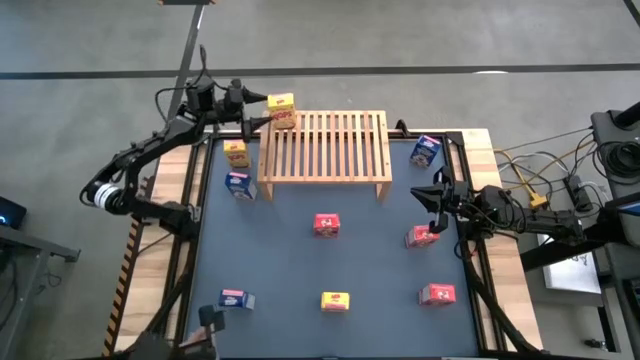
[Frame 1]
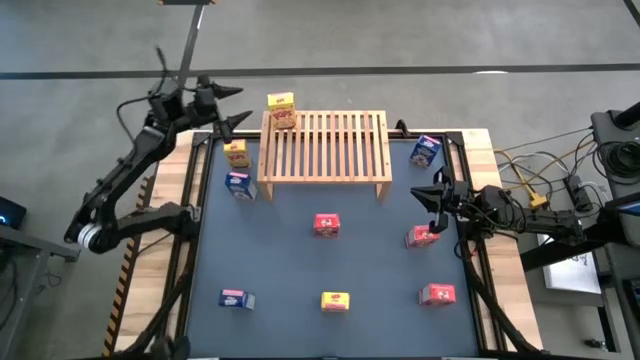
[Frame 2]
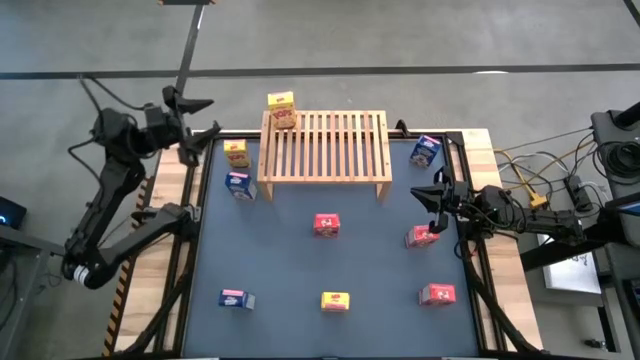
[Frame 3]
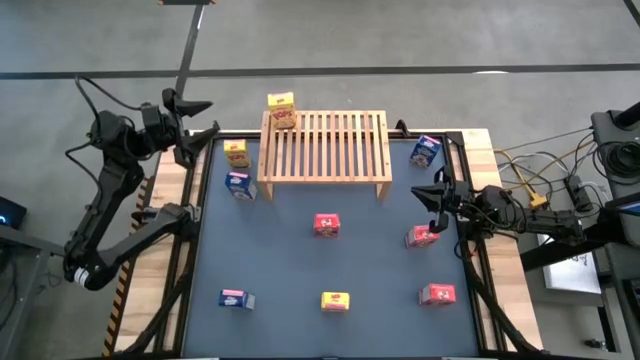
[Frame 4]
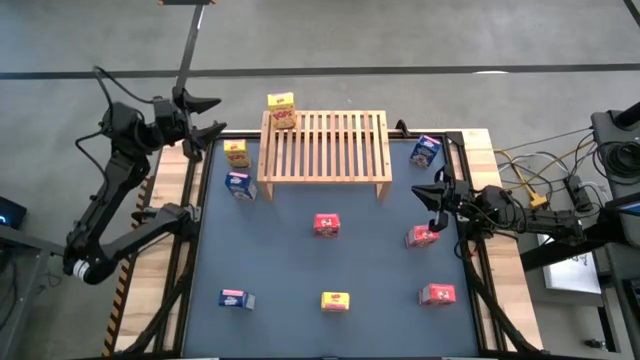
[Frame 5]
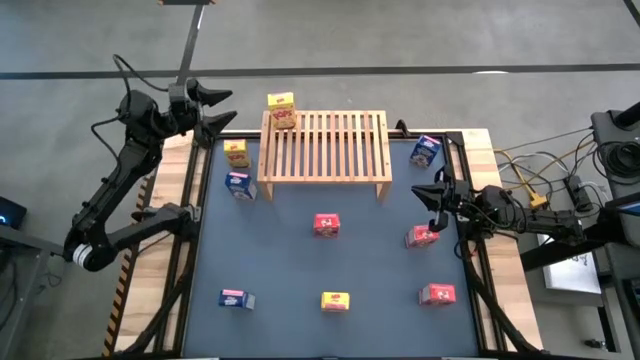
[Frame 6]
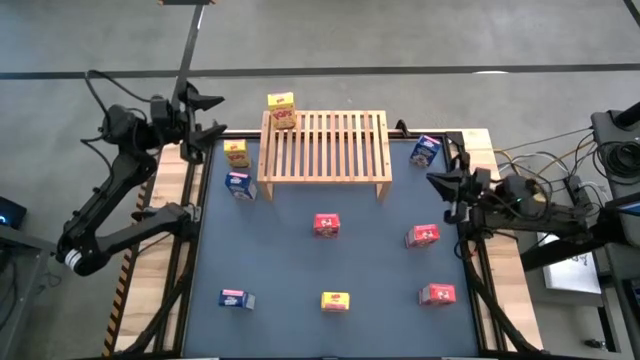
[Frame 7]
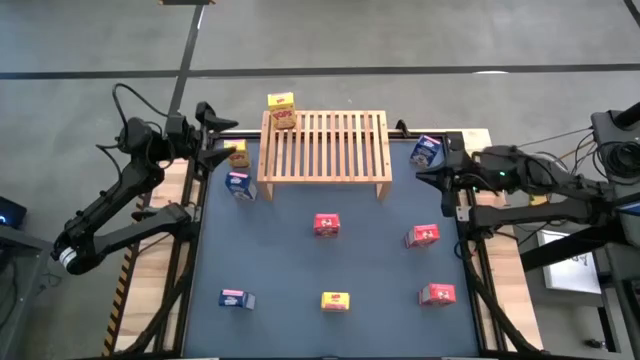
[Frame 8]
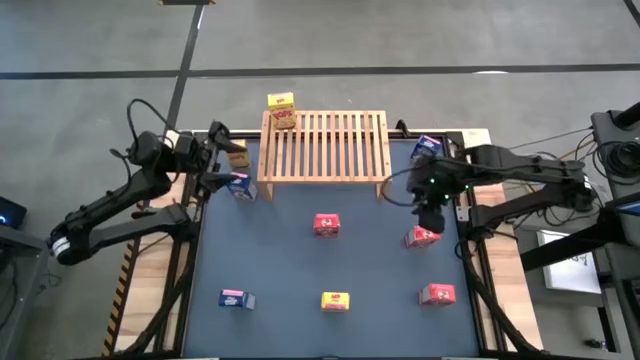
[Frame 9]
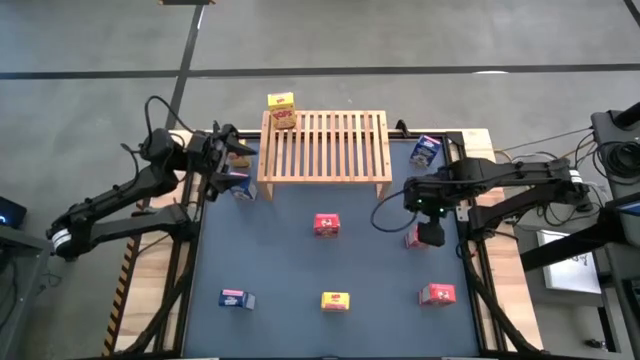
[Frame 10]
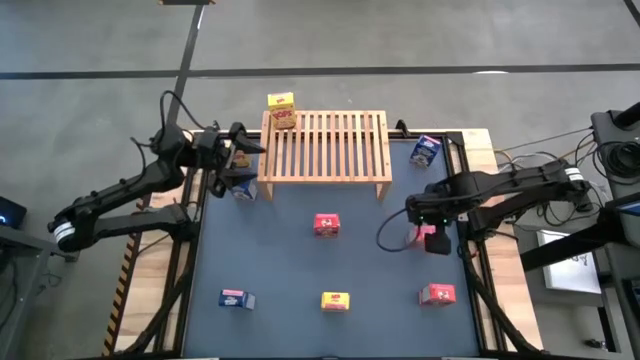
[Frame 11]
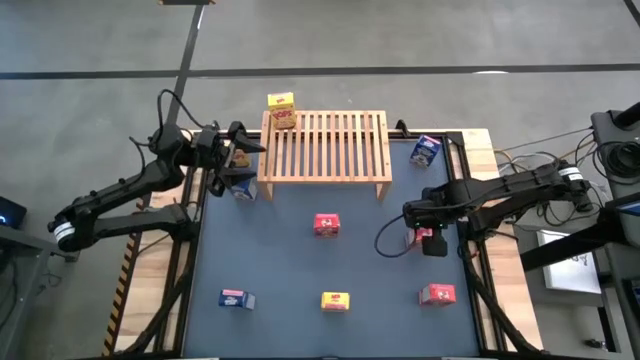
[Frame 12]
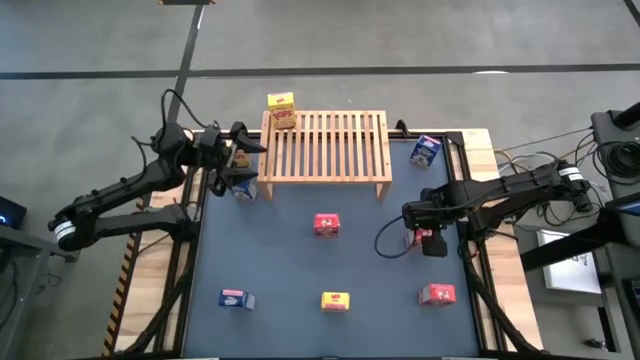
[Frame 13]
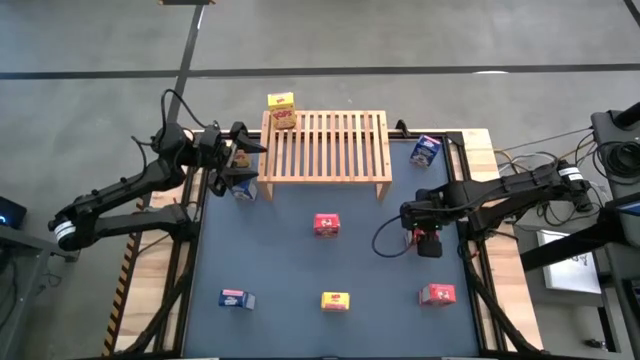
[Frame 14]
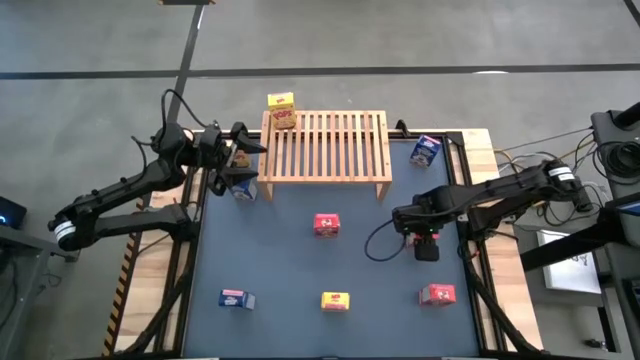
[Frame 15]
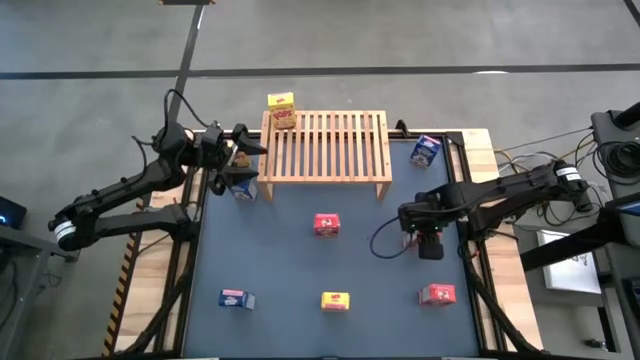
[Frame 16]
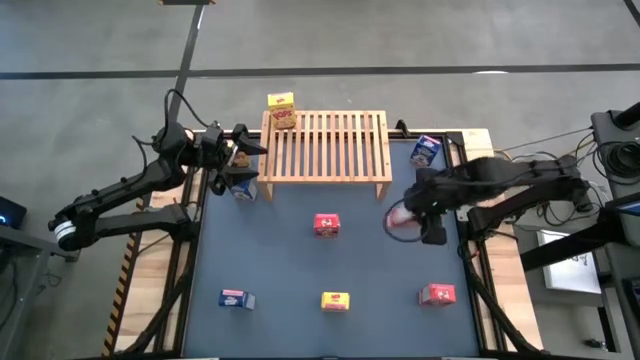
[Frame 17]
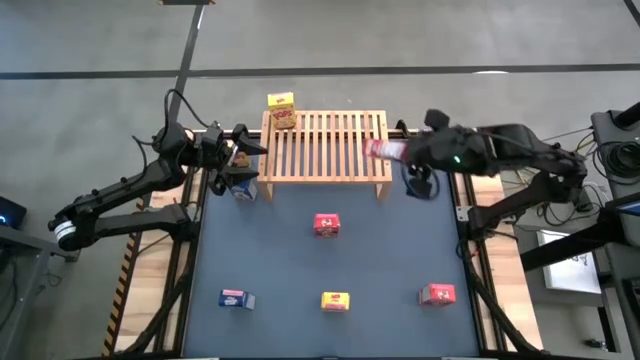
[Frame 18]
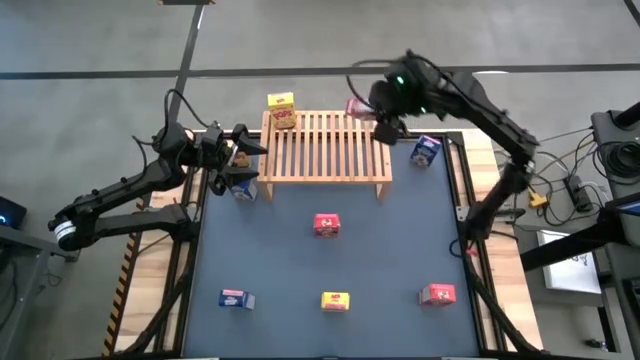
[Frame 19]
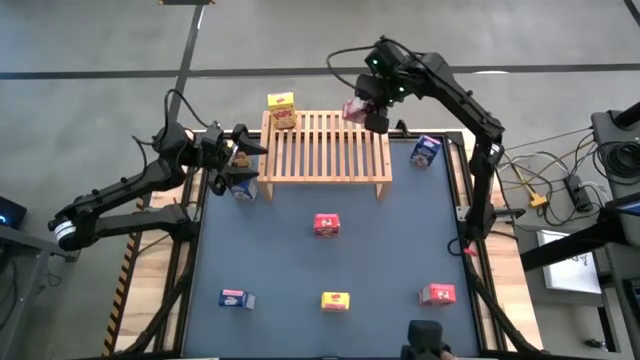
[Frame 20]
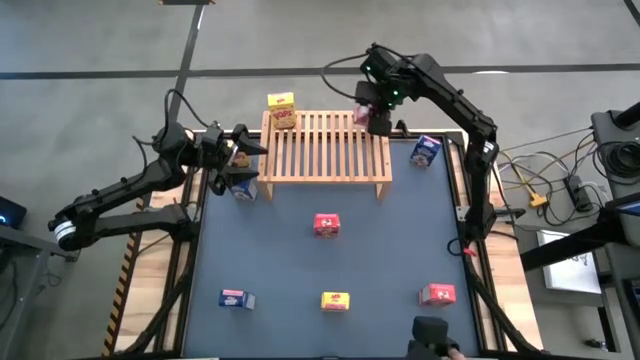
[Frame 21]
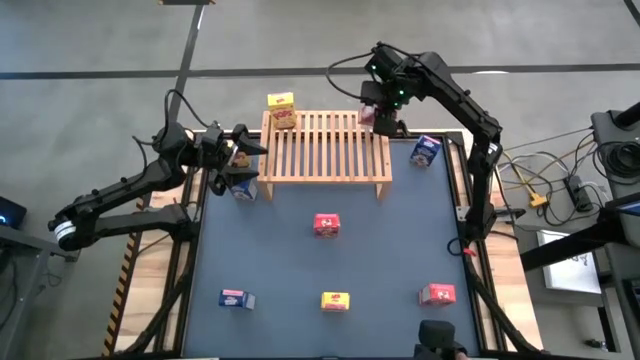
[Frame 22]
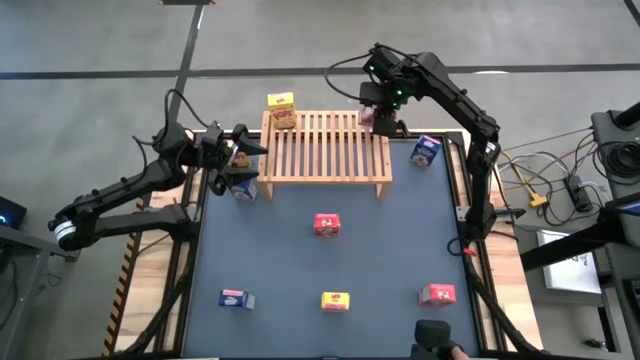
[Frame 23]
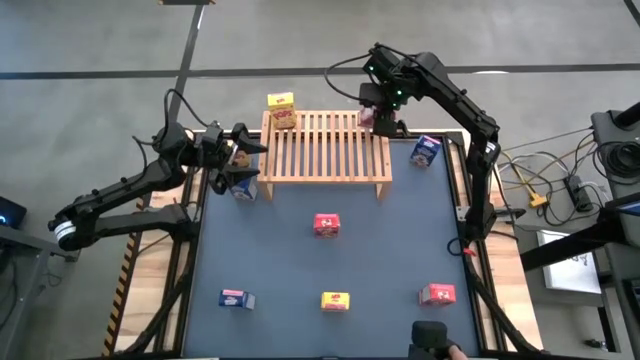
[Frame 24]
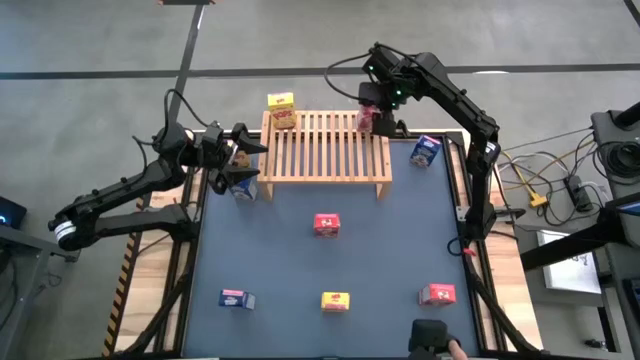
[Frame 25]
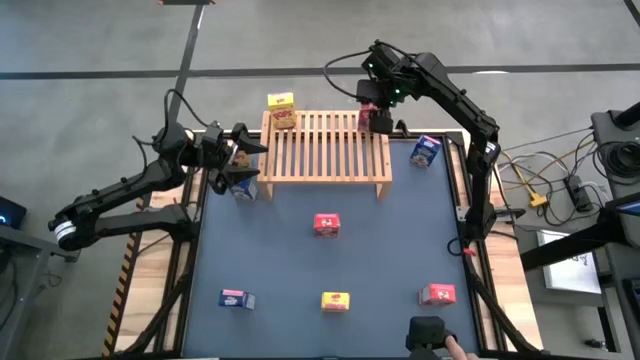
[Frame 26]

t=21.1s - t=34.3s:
Task: Stack cereal on shelf
Put the top right red cereal box on the shelf

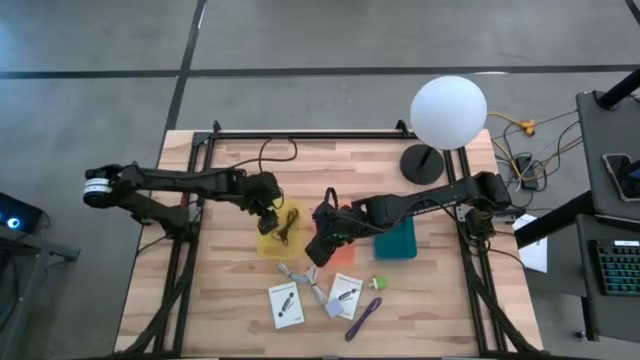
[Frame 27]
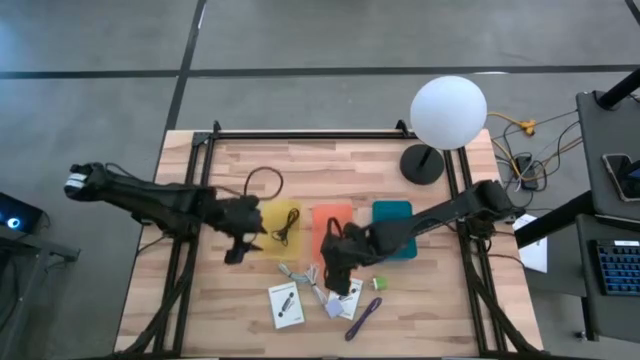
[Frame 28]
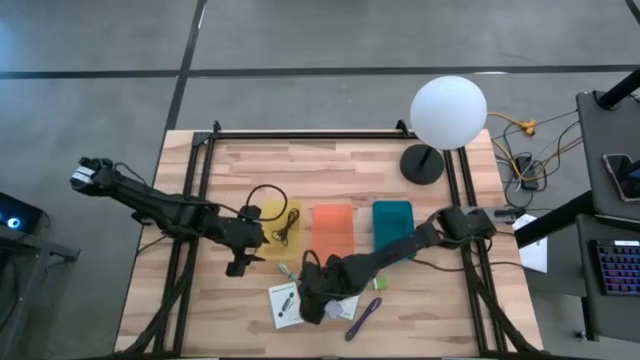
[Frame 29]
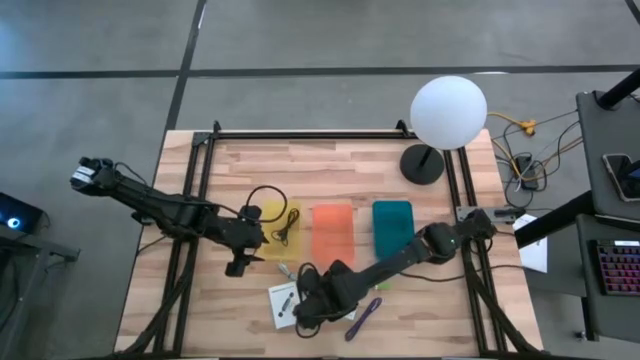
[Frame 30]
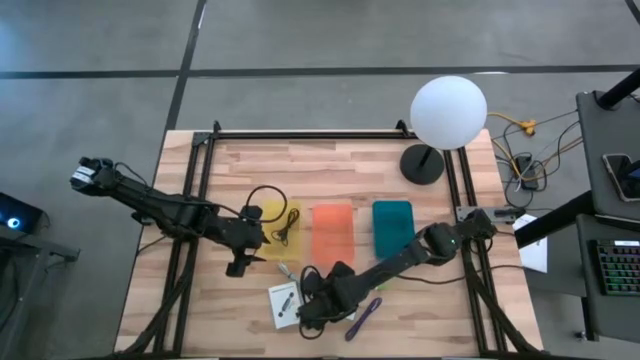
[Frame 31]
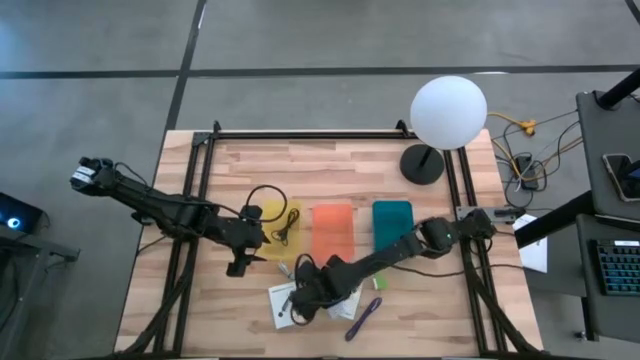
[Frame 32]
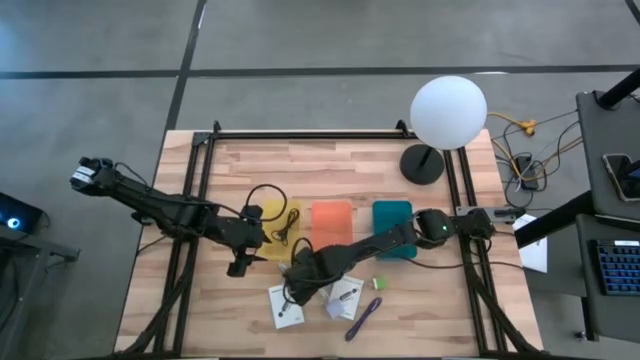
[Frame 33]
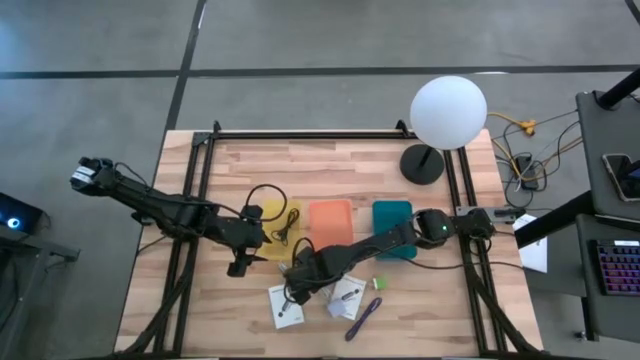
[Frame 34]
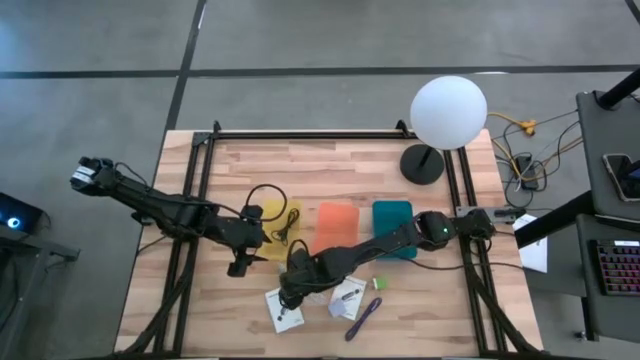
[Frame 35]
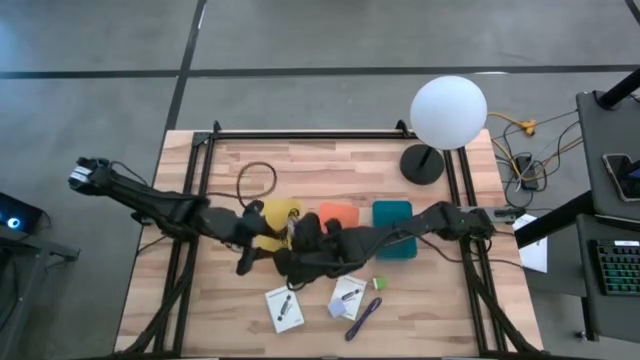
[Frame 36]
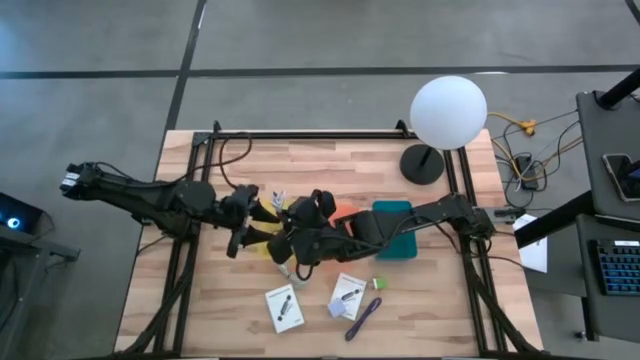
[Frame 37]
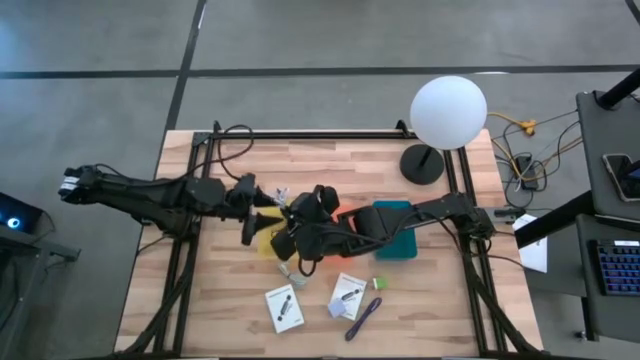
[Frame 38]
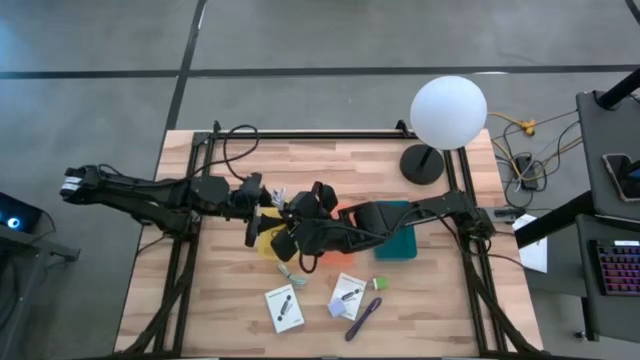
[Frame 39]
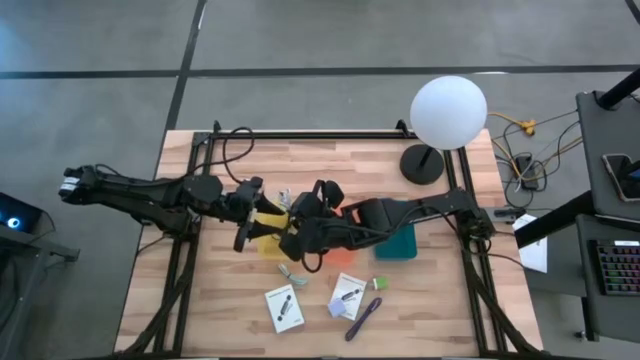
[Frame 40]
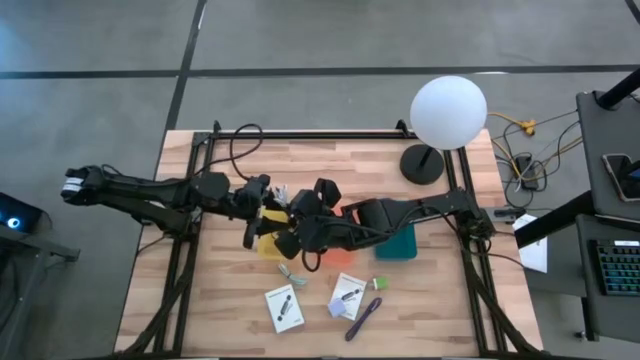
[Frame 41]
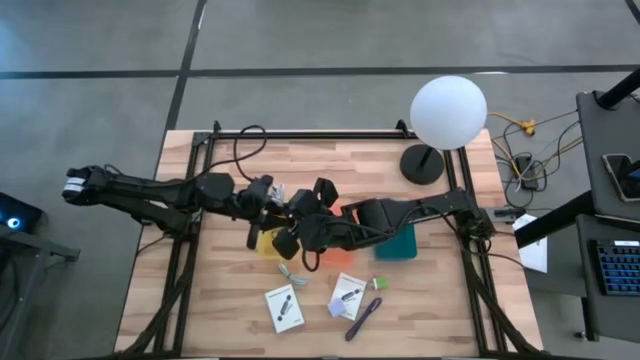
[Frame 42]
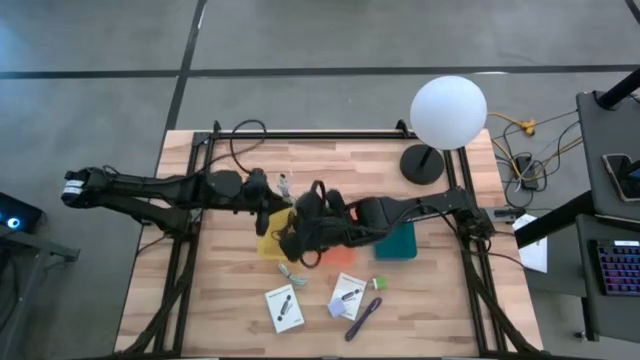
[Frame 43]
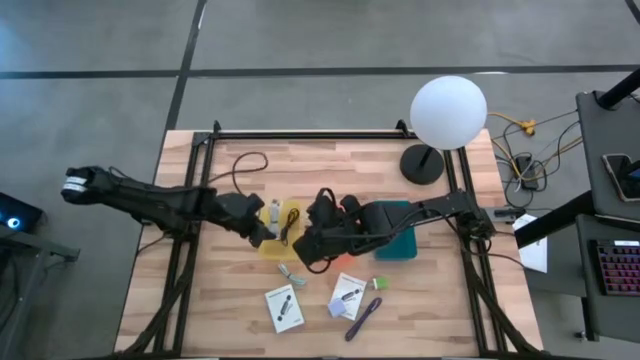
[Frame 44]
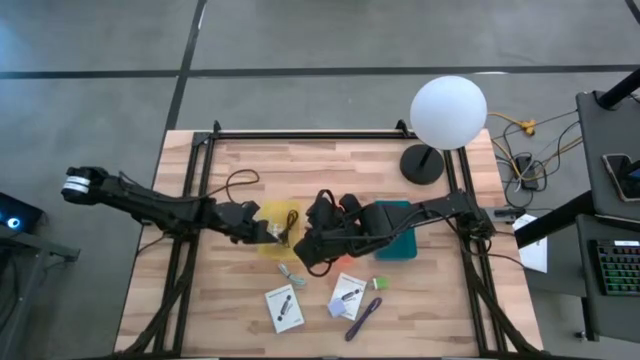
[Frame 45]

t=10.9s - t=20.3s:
Task: Pick and place items into bin
Put the white USB cable into the yellow bin
